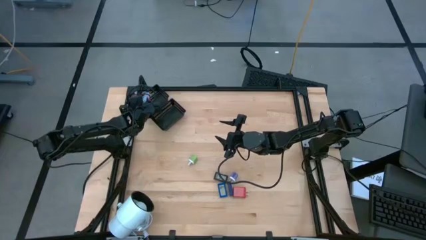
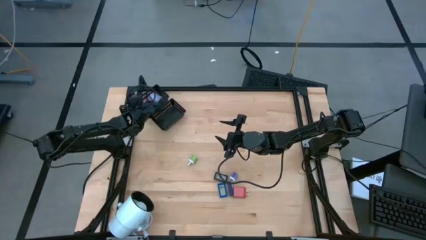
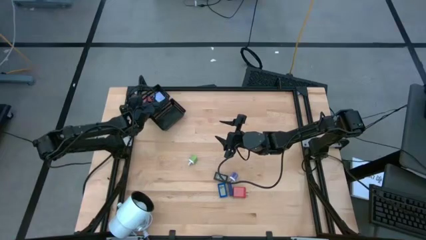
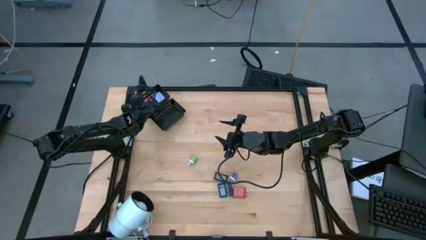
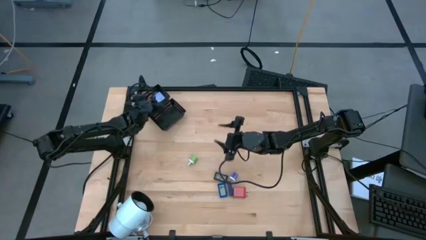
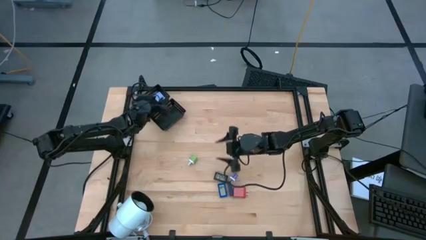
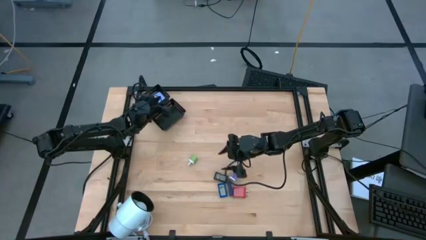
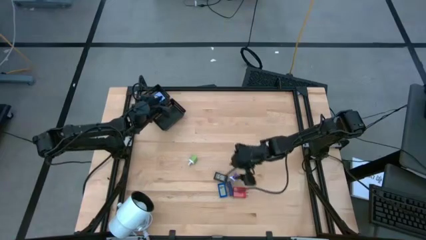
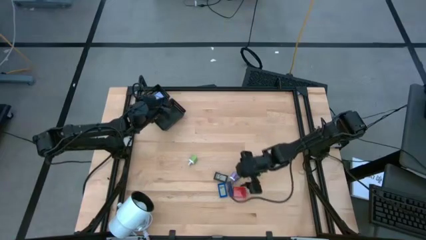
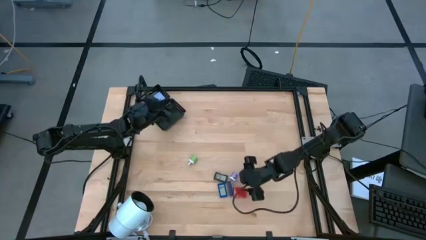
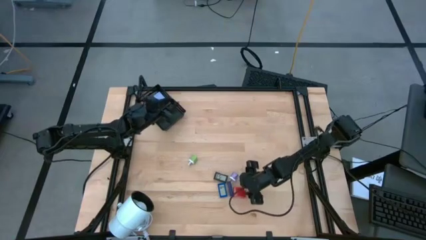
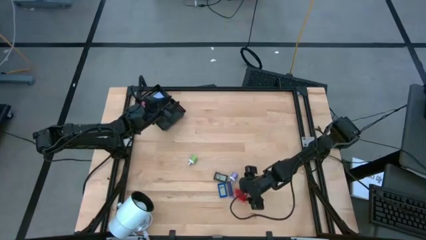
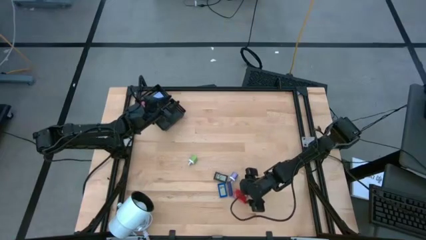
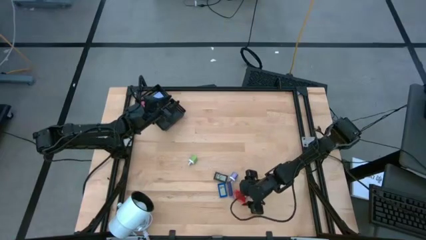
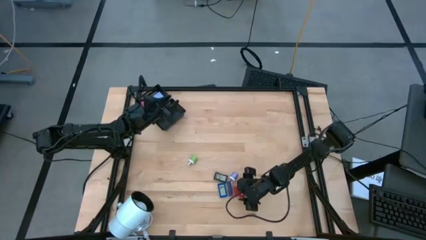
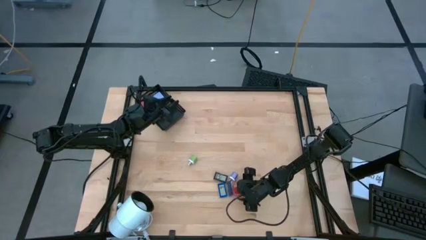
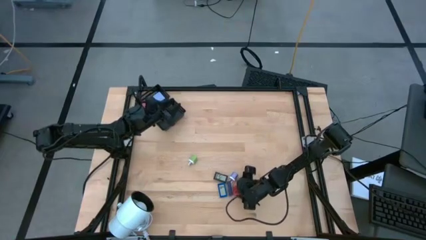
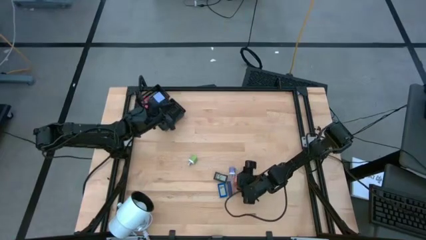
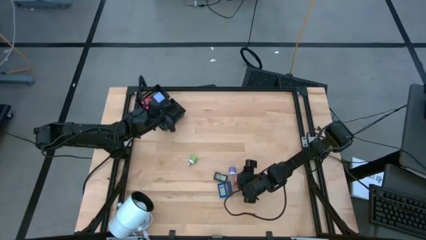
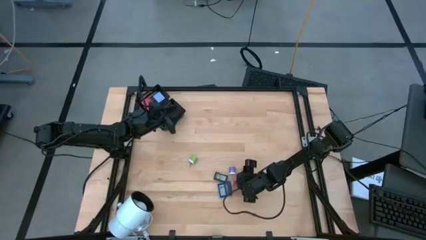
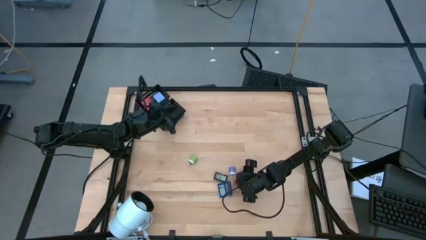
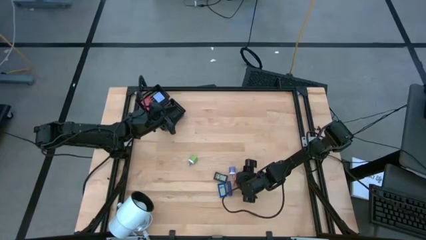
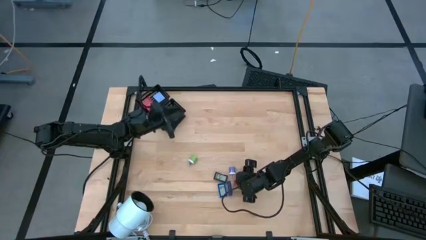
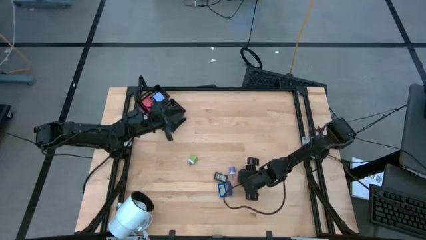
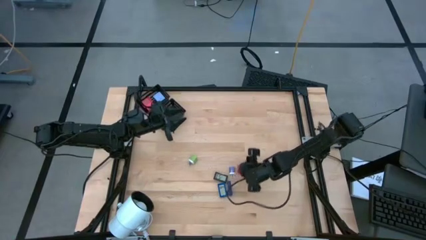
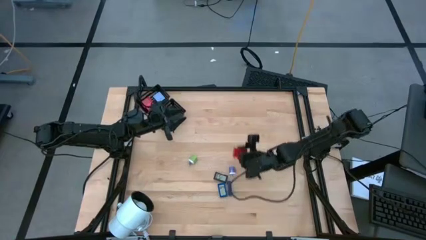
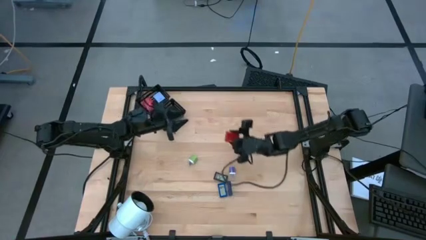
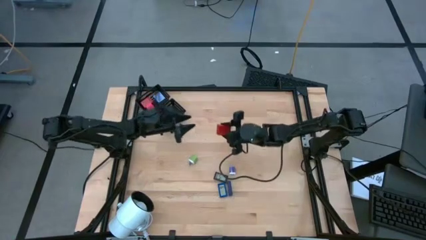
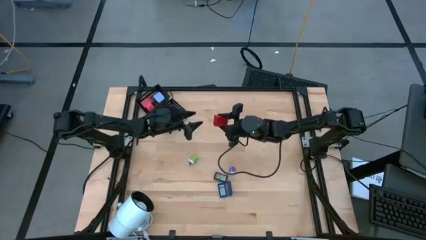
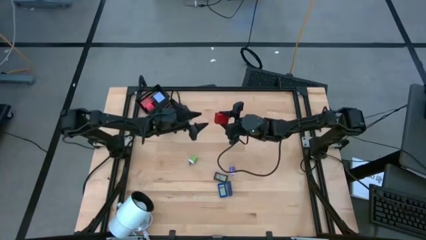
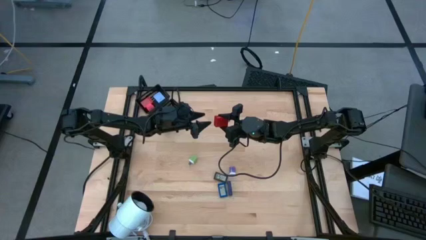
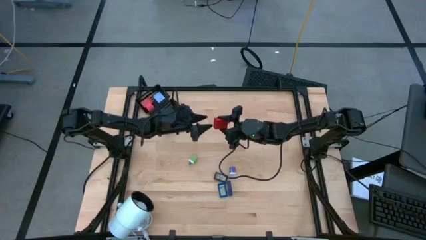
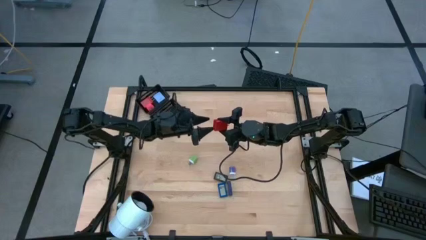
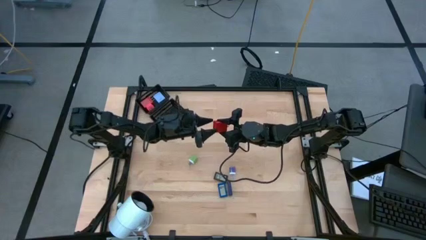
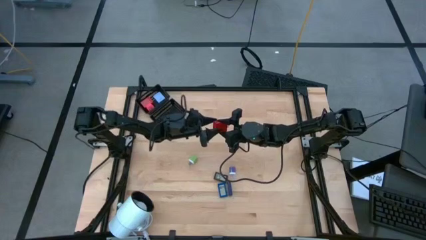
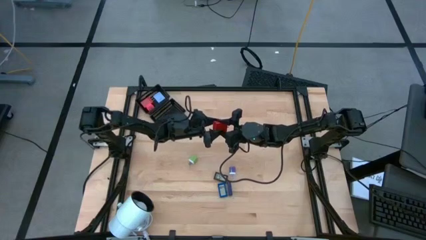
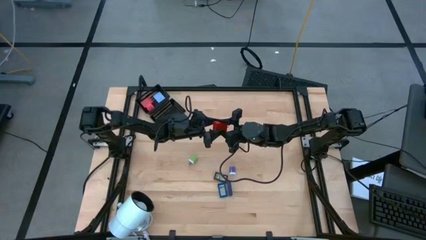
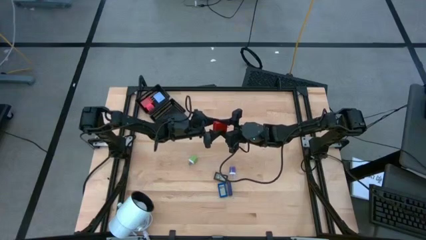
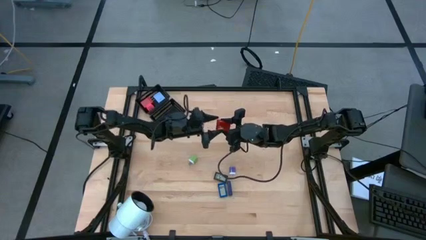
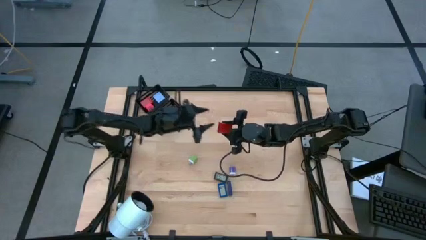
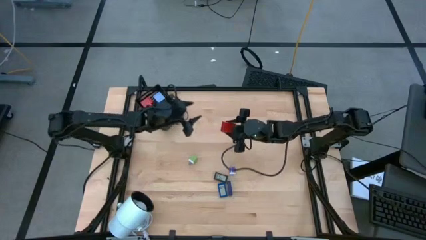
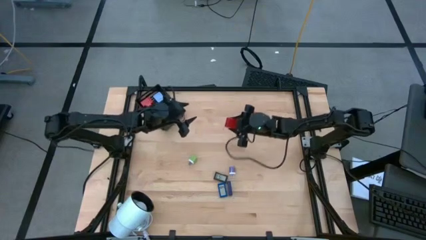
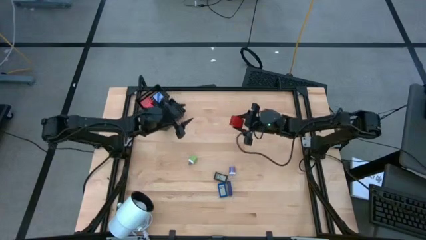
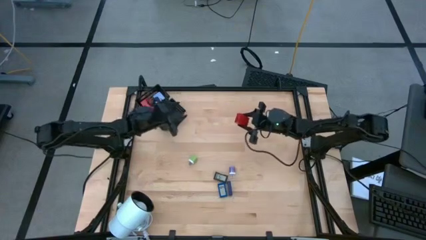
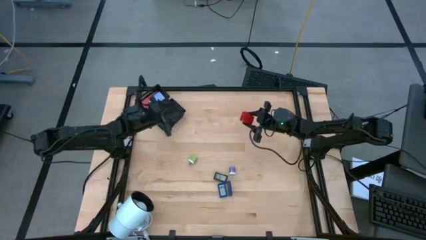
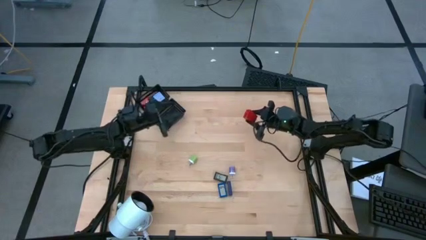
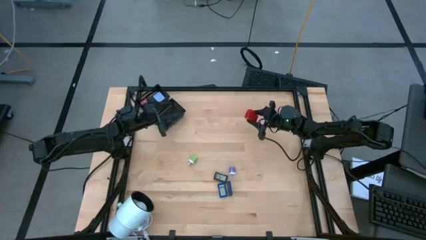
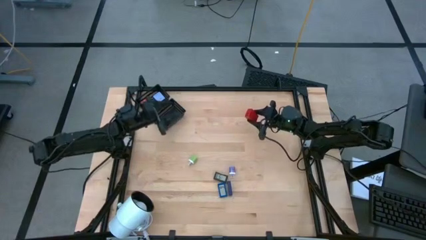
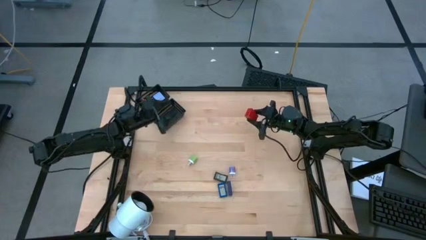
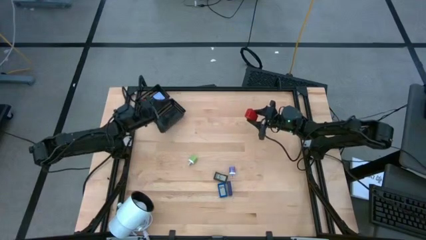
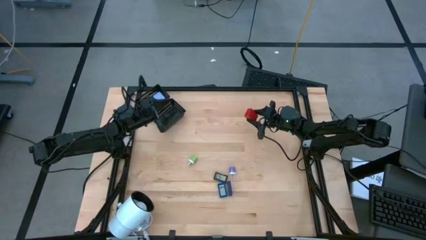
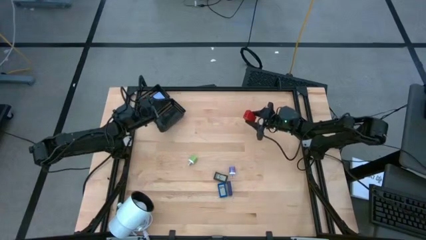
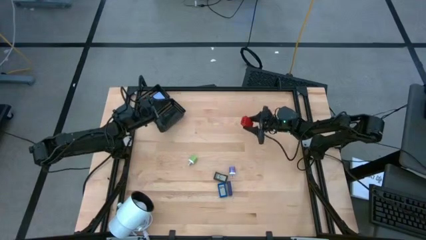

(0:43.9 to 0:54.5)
Task: Pick & Place Office items
Put the red charger adapter into the top black bin

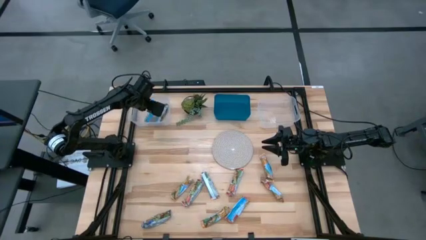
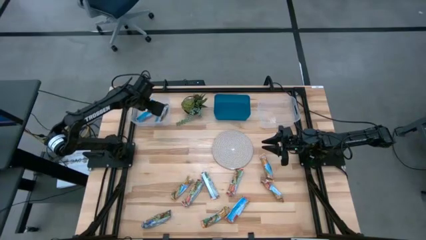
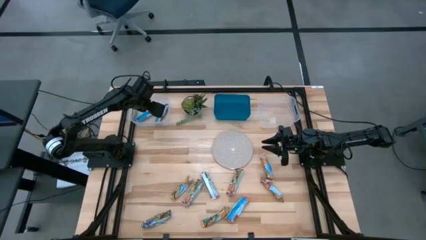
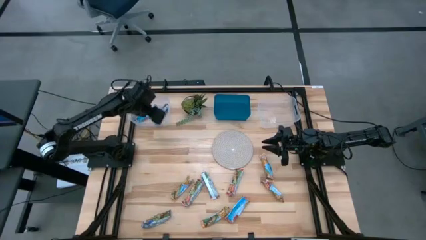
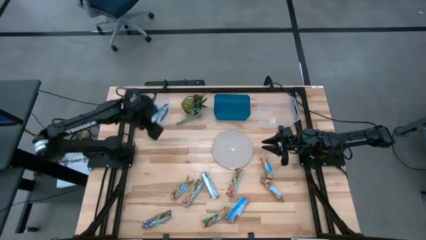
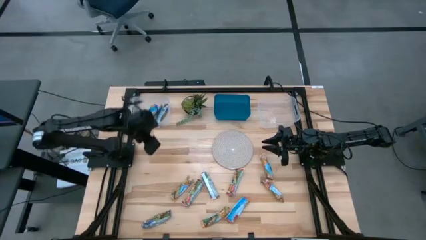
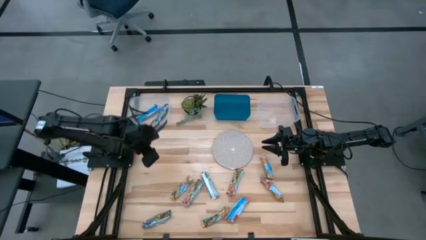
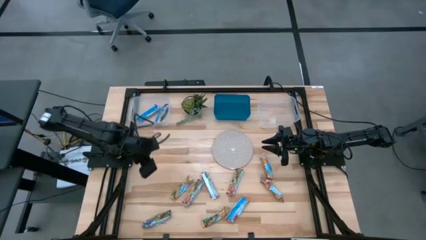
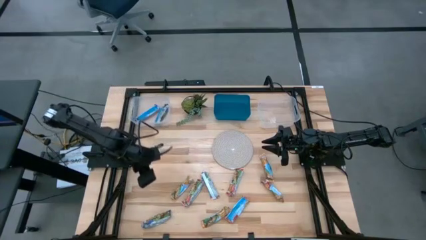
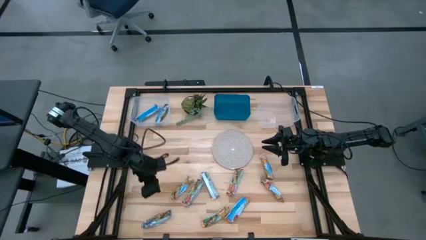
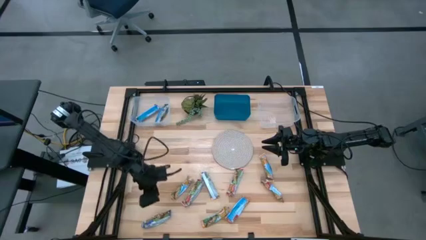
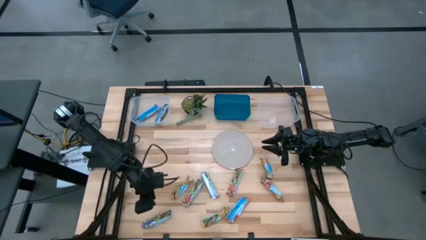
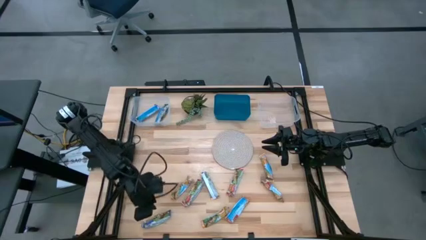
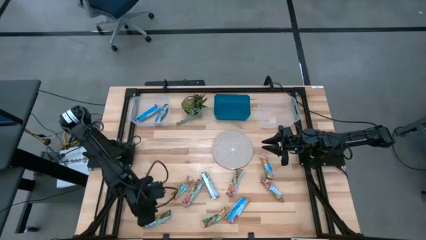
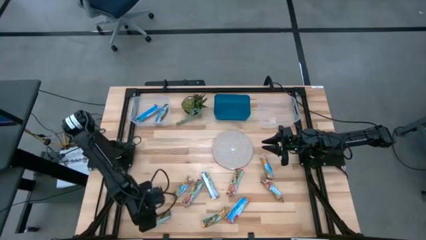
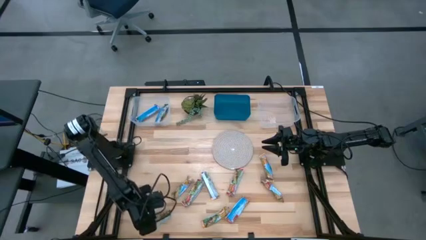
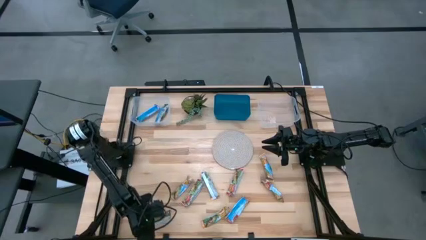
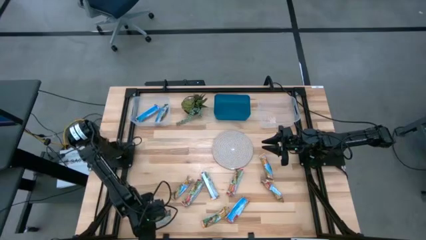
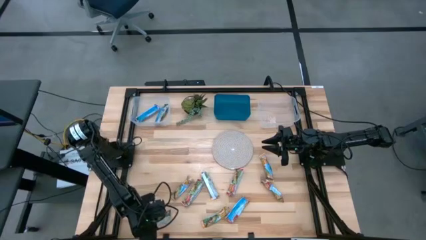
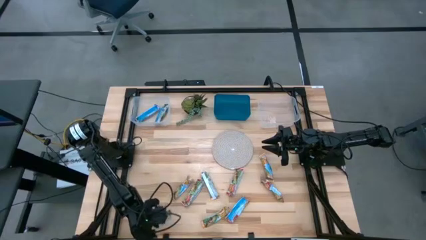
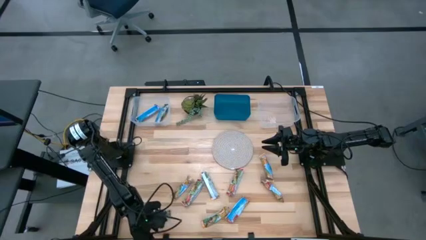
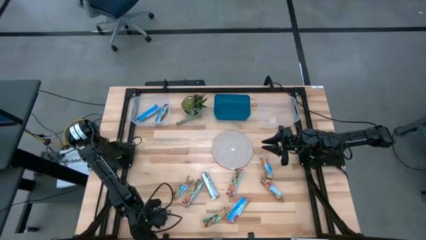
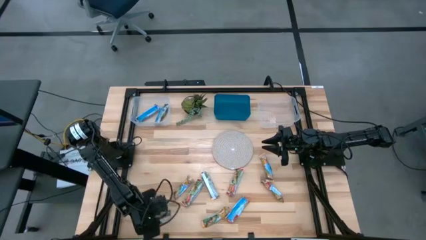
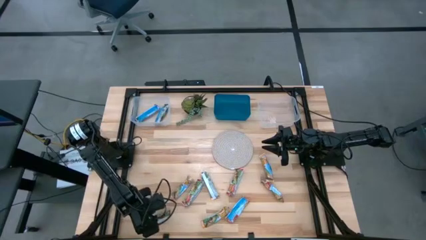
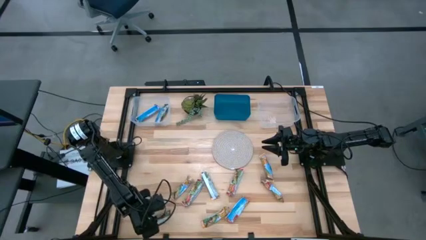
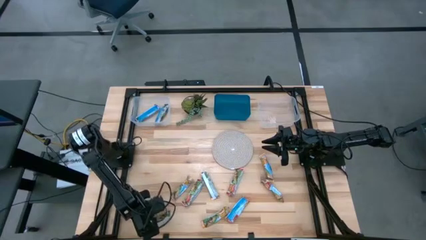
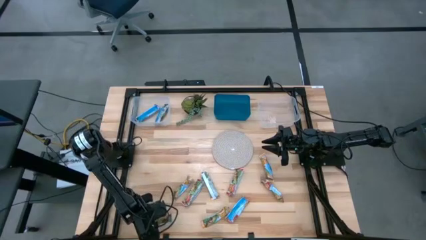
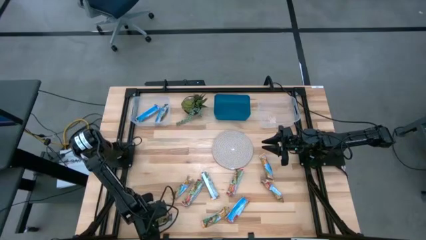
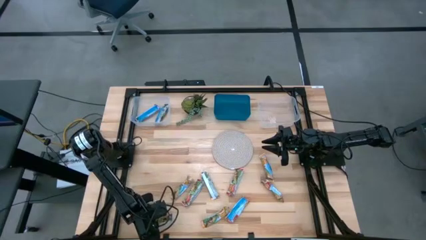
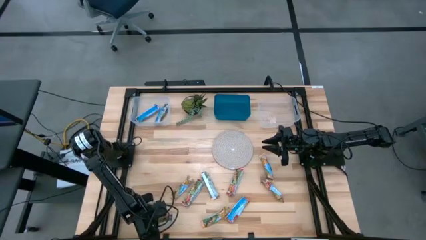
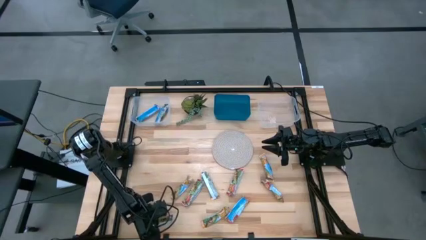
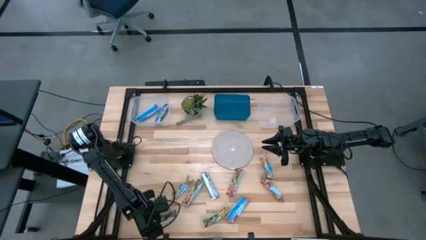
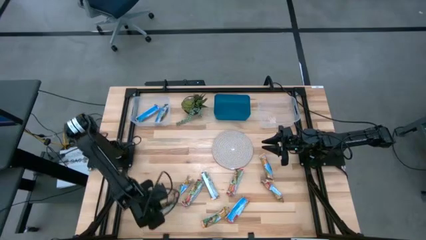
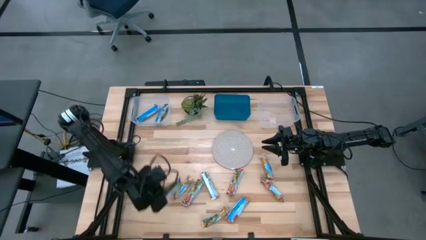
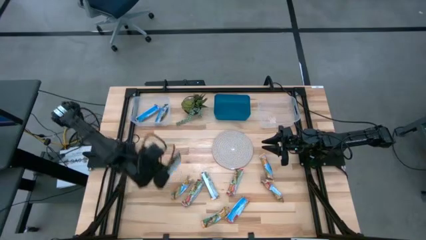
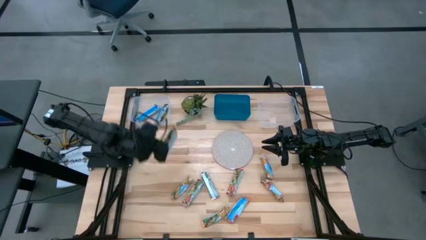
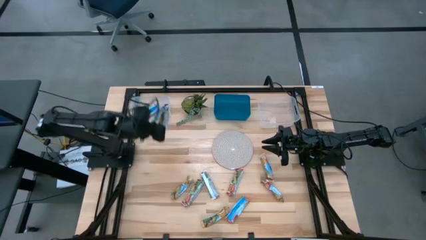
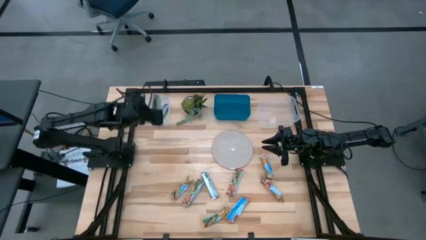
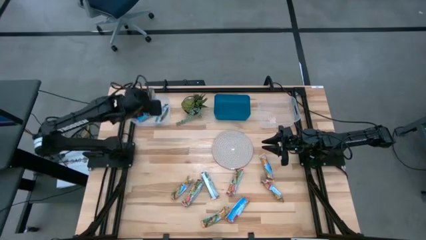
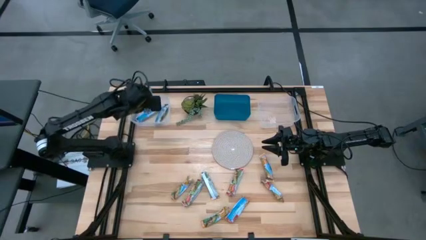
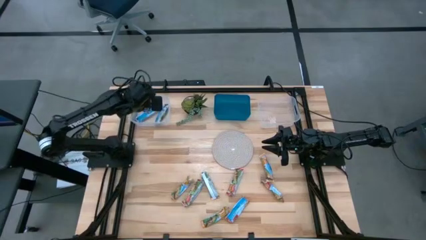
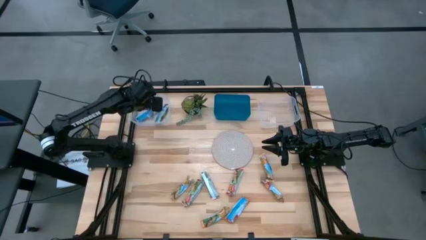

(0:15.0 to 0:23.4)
Task: Pick and place Granola Bars by type
Put the blue granola bar into the left transparent bin
